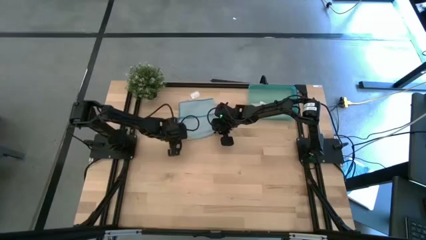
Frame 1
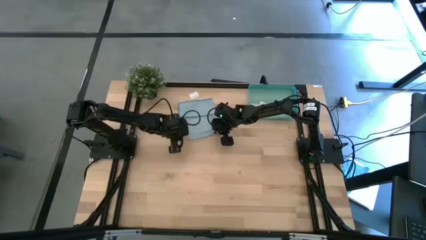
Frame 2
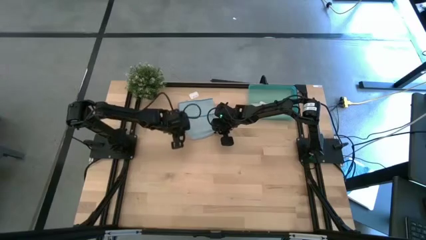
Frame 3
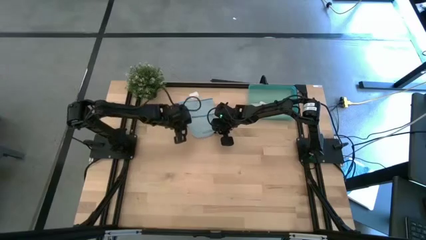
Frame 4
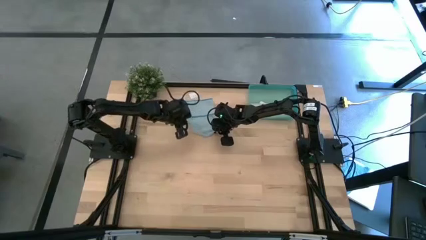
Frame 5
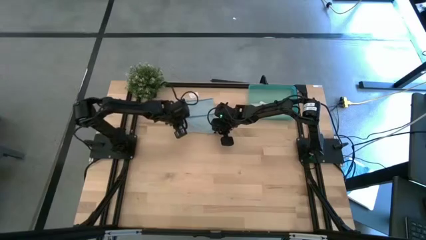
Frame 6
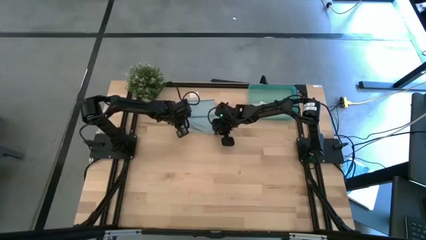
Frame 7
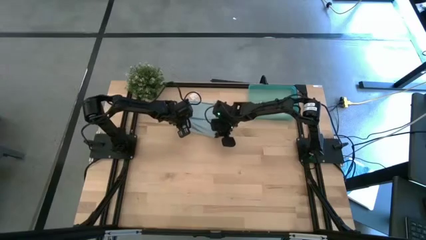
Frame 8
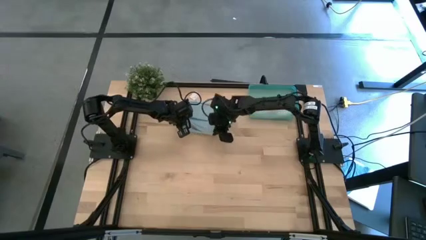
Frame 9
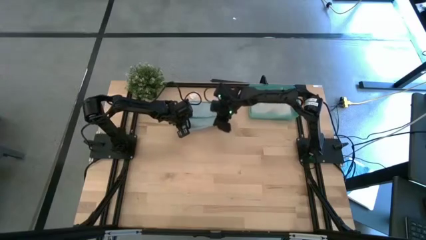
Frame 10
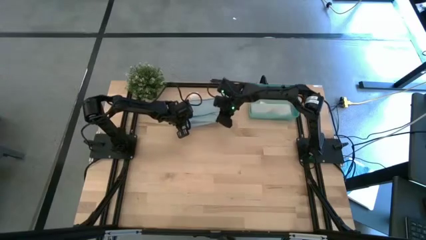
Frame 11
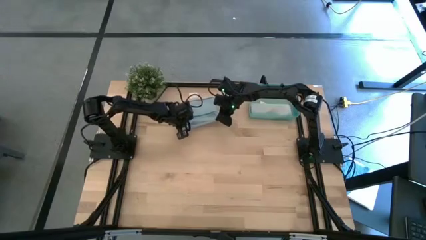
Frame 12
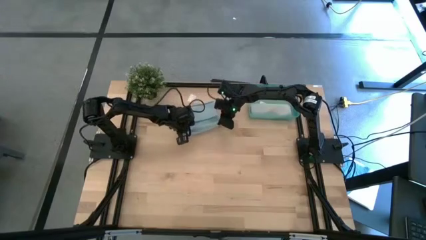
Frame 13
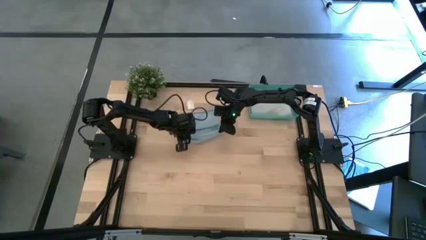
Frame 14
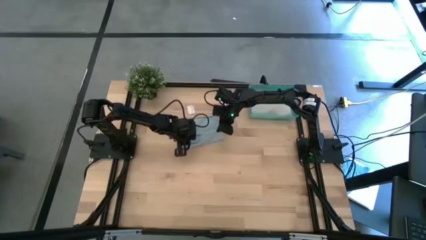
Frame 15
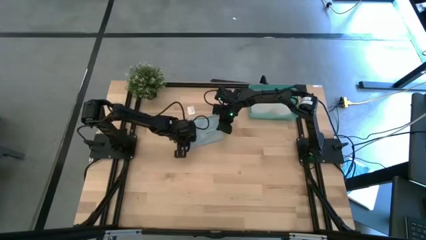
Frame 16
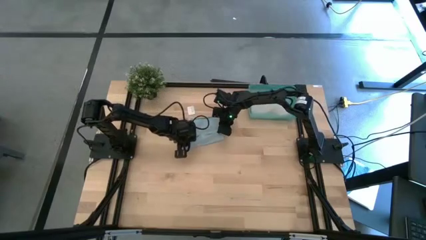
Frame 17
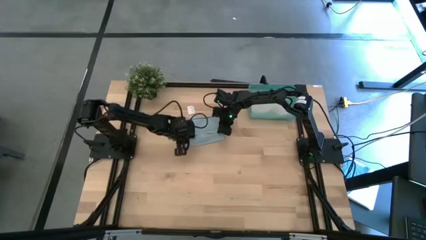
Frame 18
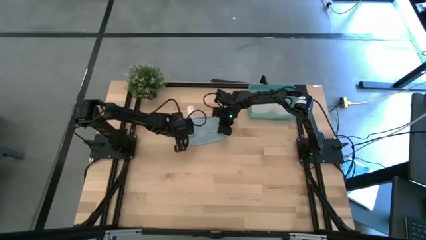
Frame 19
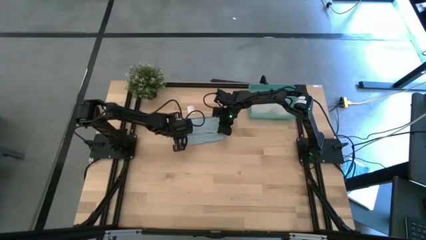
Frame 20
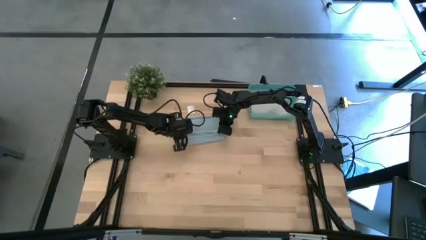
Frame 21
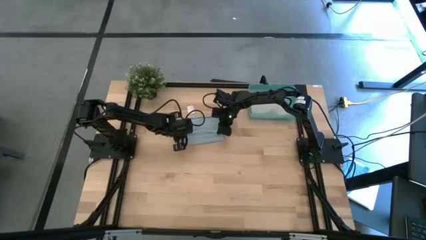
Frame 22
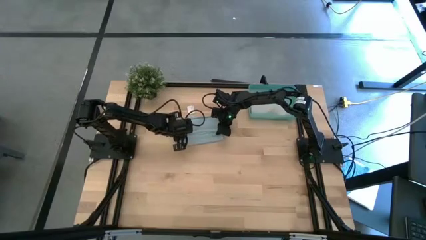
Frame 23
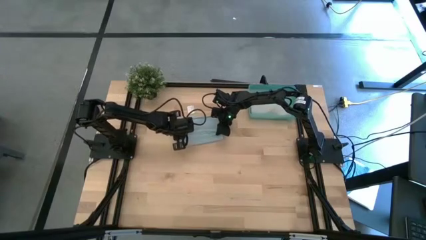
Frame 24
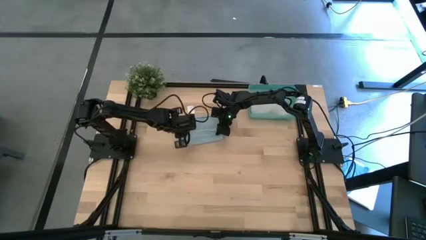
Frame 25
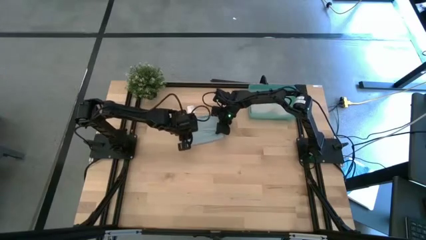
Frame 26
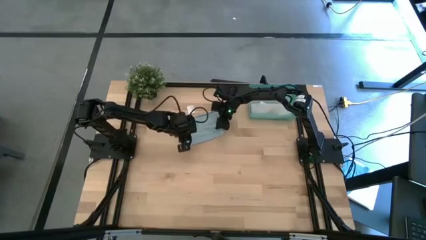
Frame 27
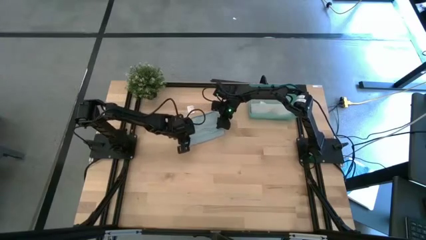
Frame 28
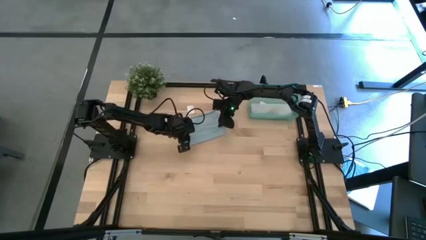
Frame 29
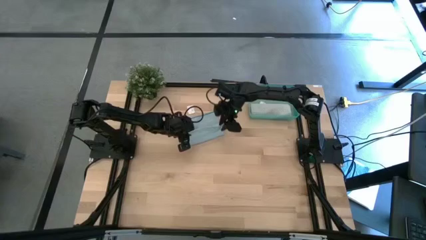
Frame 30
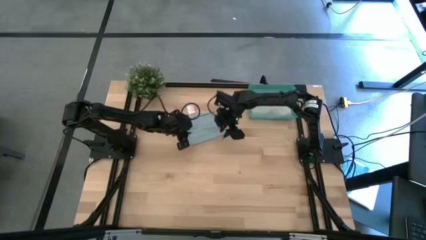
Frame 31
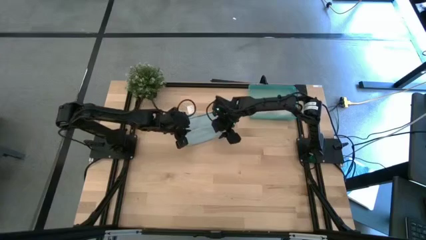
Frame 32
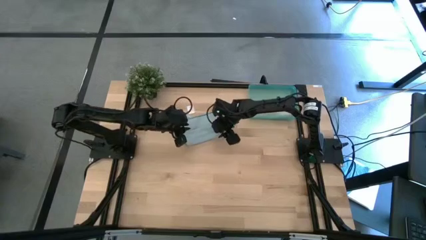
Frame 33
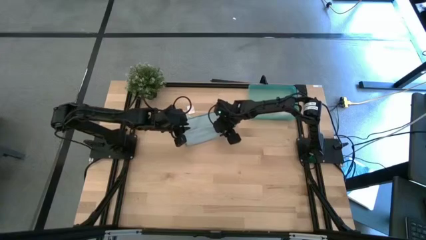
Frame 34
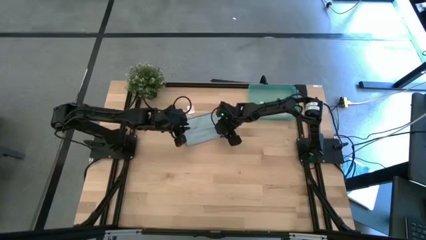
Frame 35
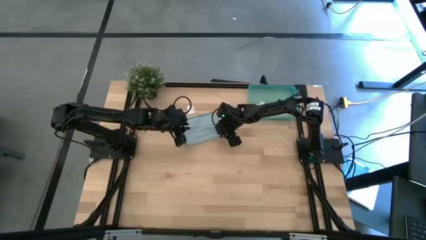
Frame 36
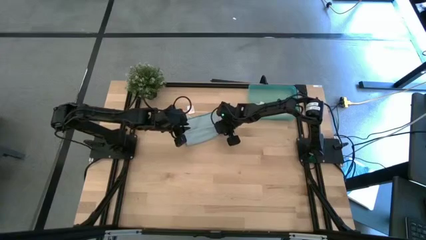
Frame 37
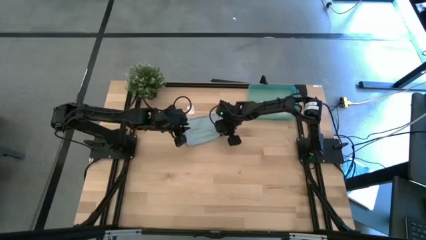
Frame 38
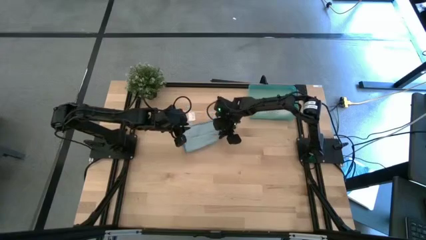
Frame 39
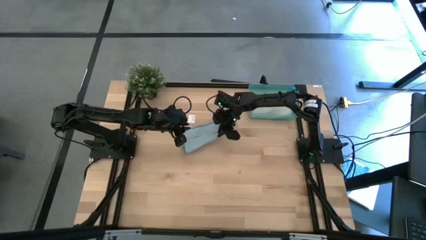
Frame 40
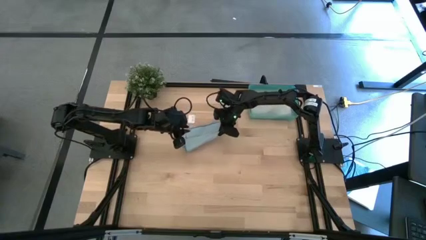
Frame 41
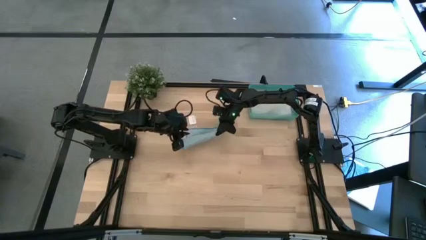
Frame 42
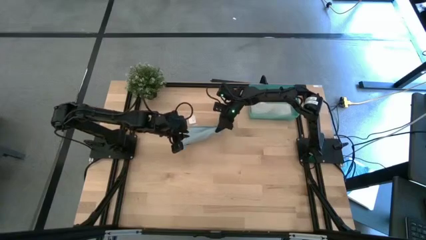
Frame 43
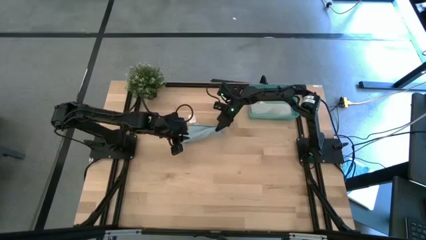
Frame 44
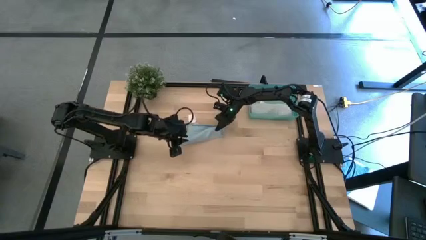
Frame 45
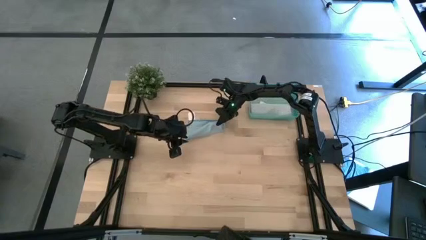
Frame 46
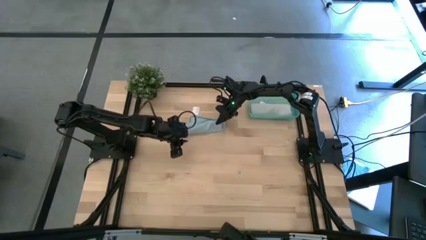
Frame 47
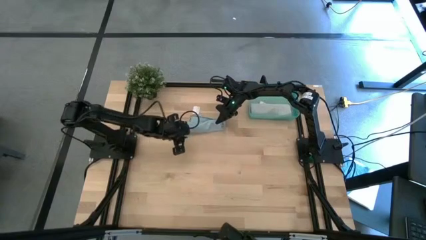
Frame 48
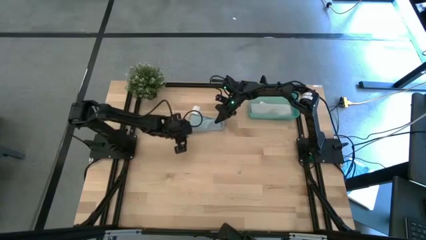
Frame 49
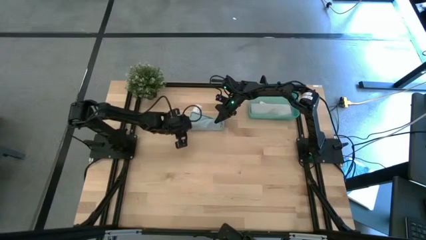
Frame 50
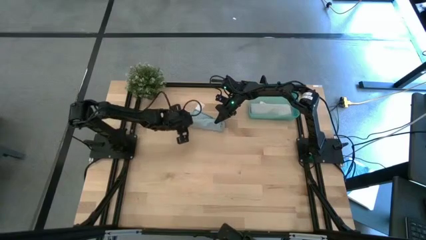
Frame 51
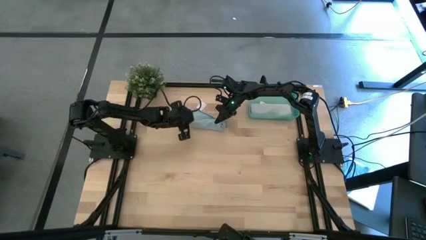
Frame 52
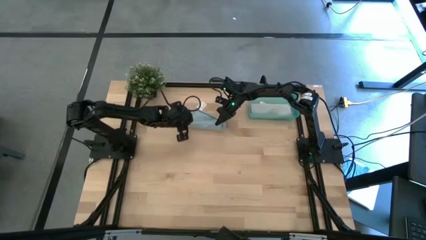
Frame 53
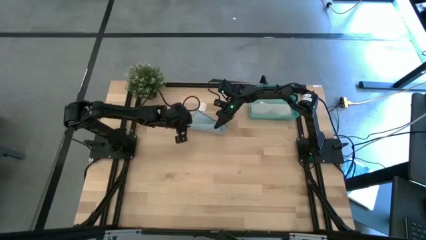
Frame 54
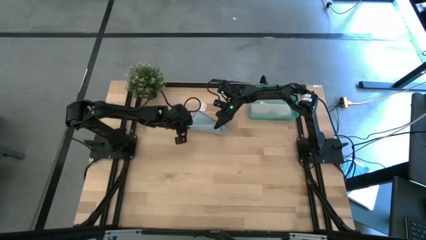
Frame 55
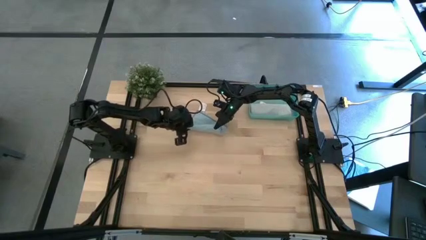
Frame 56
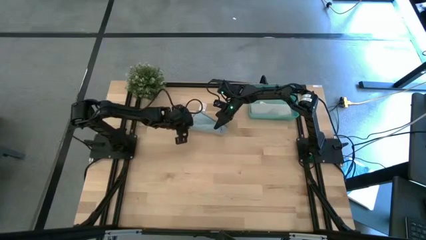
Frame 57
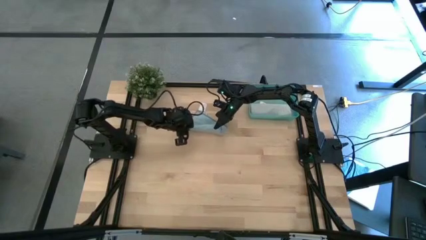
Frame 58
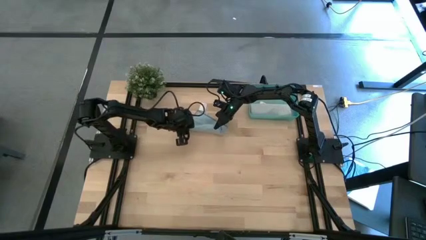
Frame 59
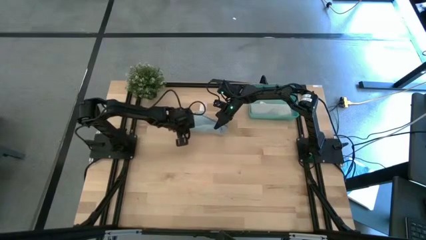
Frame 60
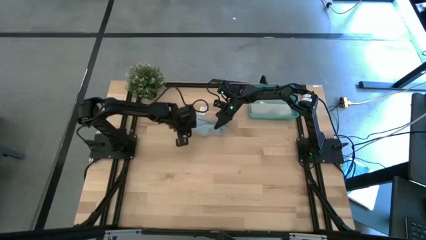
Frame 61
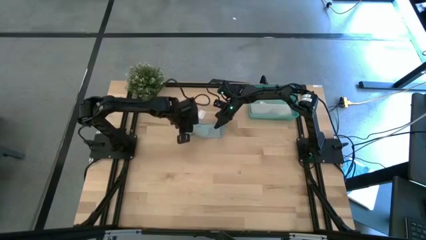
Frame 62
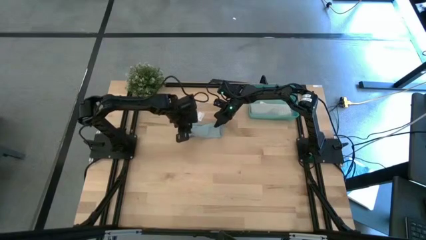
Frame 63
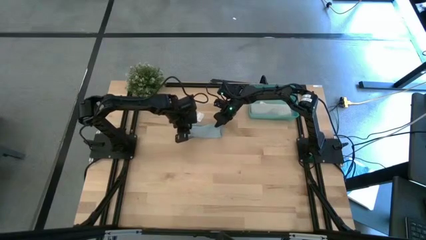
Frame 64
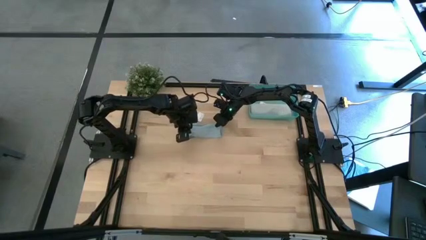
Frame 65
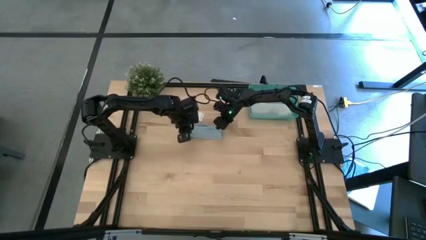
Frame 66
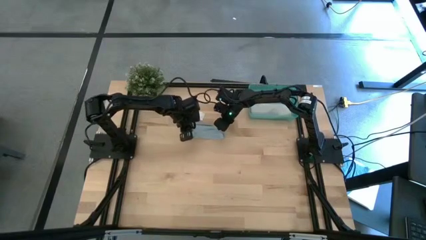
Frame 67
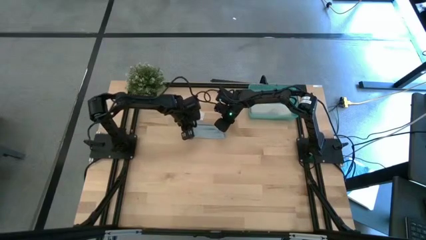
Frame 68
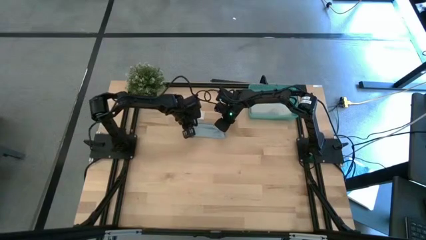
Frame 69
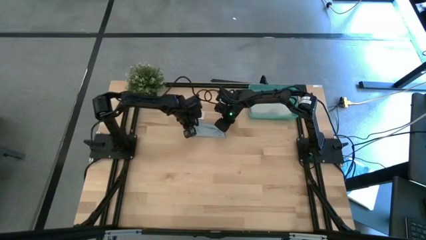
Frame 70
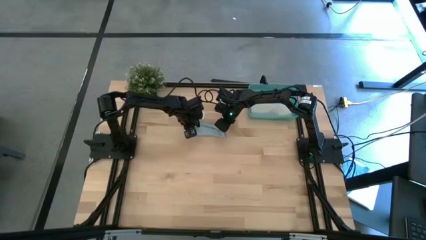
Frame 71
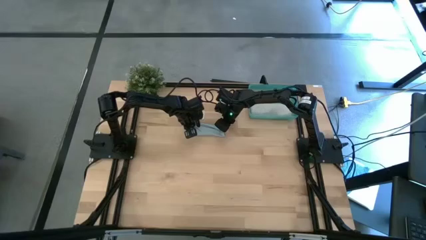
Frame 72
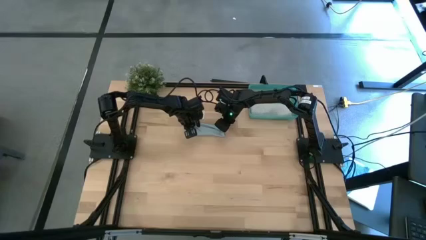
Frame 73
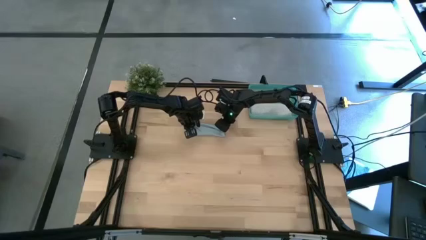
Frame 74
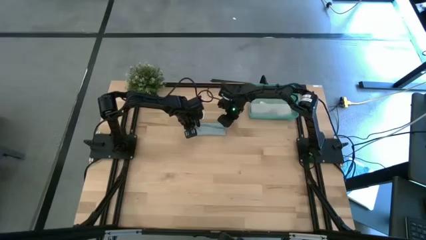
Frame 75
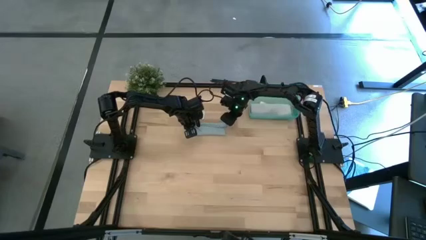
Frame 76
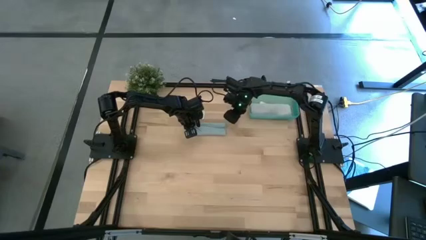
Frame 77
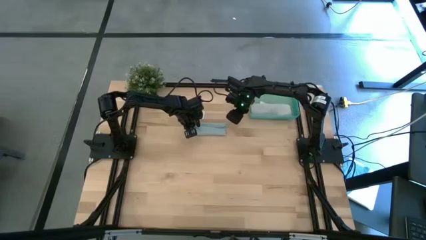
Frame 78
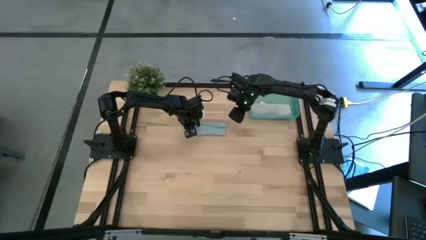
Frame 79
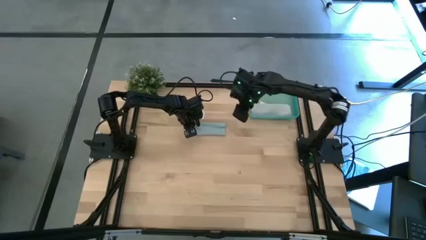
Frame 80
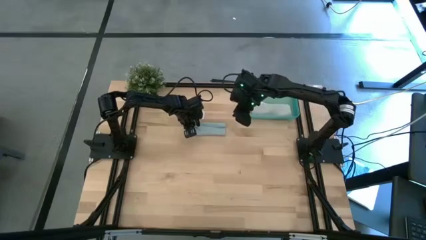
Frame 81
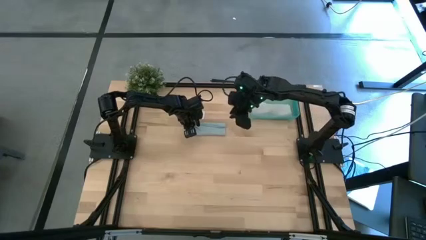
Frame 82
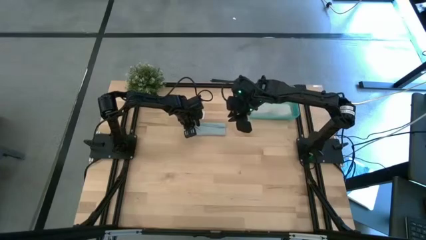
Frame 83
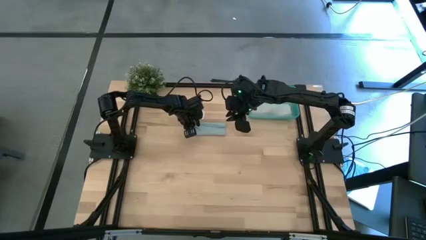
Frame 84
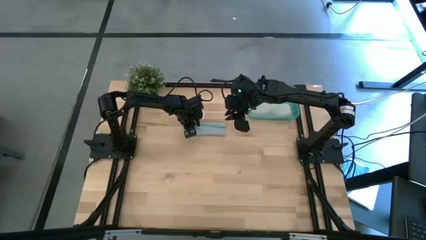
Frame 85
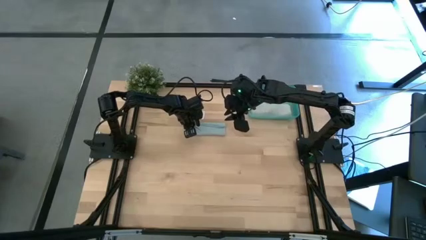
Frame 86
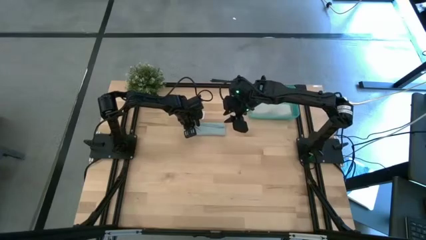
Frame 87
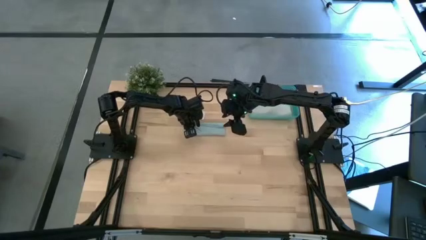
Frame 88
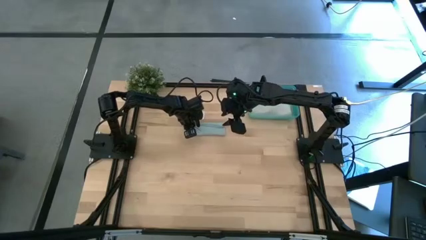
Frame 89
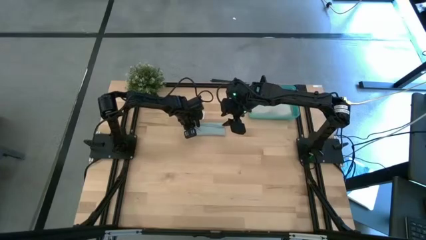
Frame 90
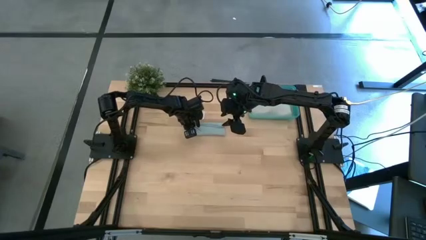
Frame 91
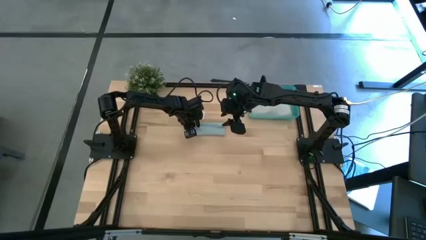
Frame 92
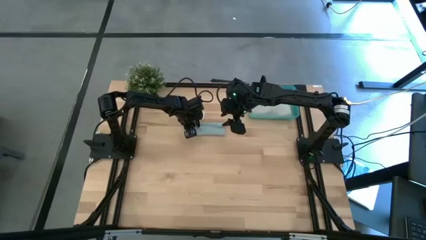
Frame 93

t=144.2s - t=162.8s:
Task: Roll microfiber towels into tight, uniform cylinder then place into a basket
Roll the blue microfiber towel
